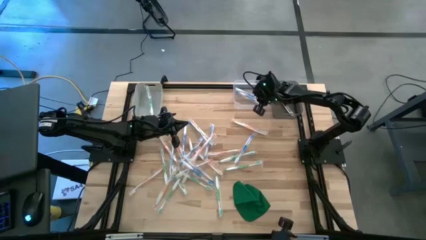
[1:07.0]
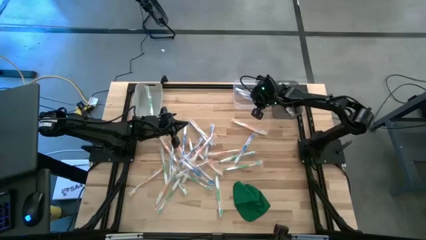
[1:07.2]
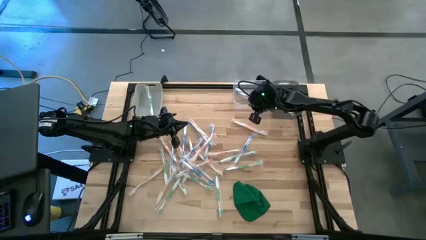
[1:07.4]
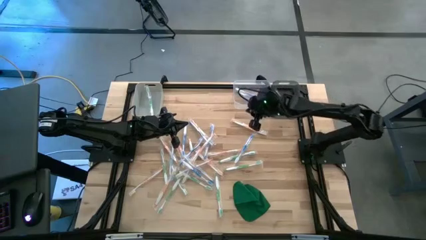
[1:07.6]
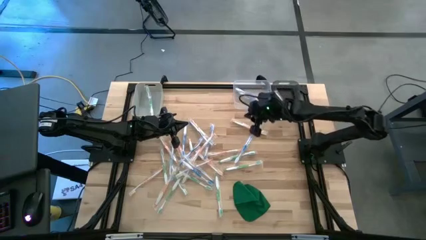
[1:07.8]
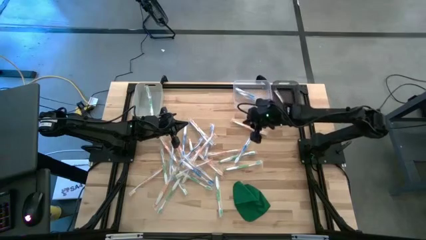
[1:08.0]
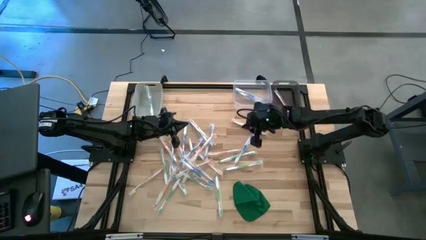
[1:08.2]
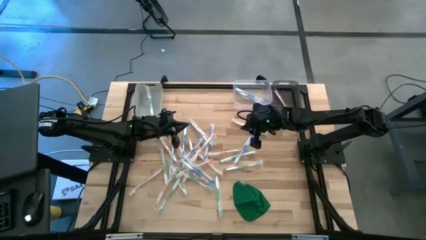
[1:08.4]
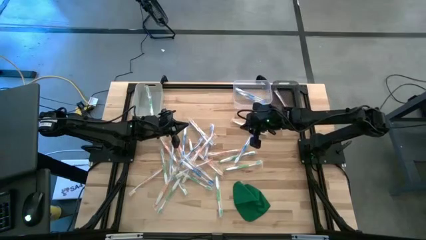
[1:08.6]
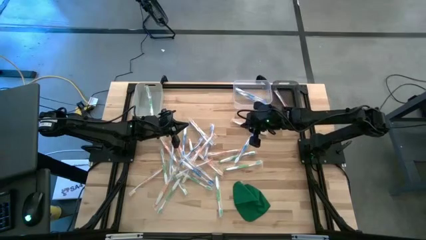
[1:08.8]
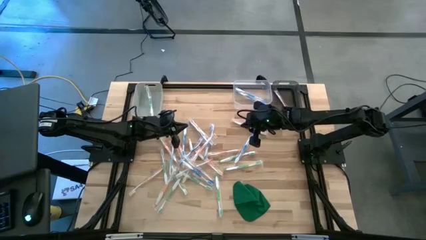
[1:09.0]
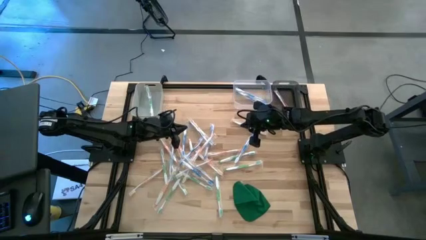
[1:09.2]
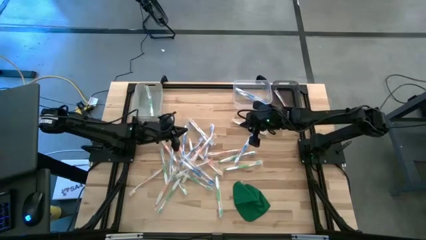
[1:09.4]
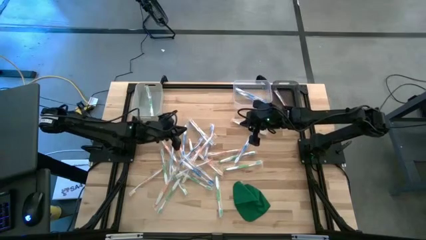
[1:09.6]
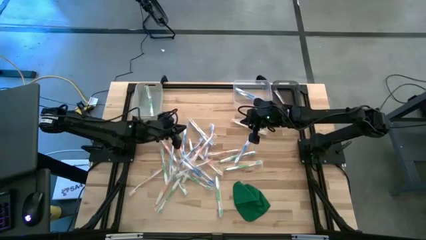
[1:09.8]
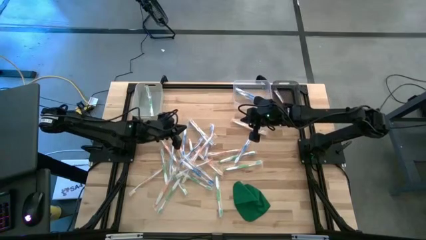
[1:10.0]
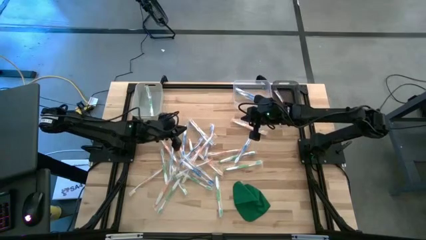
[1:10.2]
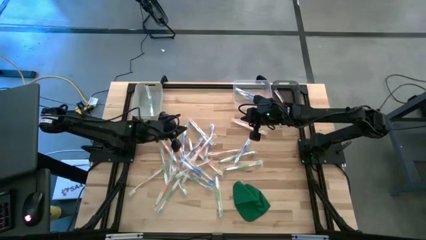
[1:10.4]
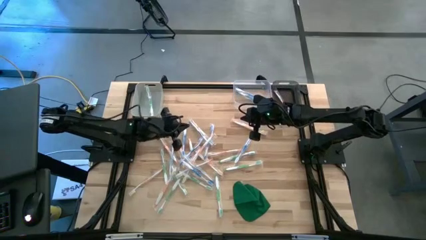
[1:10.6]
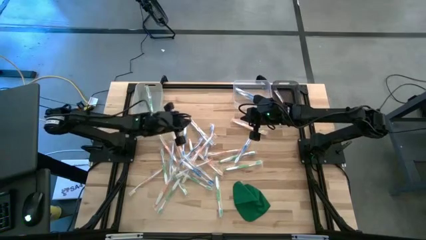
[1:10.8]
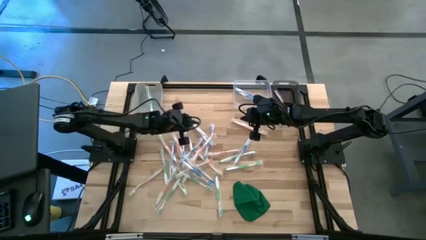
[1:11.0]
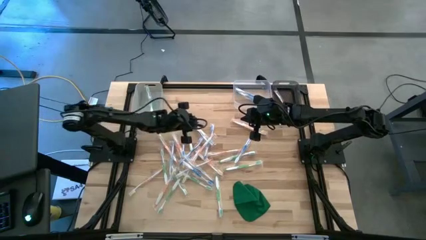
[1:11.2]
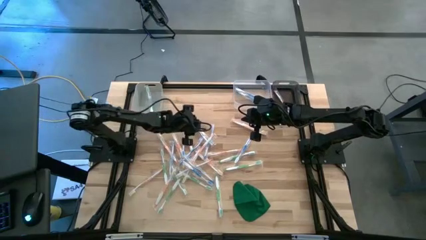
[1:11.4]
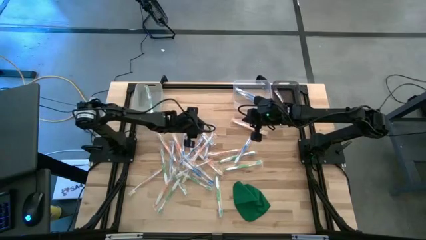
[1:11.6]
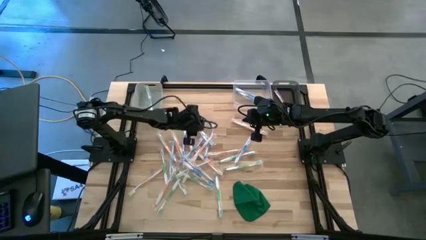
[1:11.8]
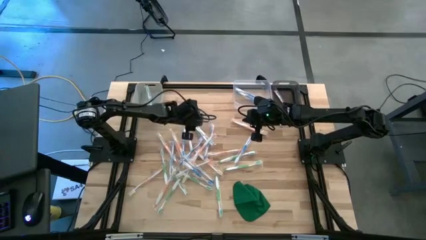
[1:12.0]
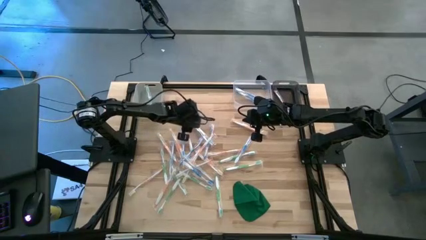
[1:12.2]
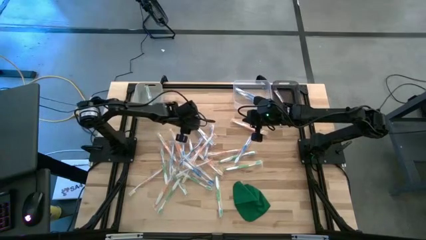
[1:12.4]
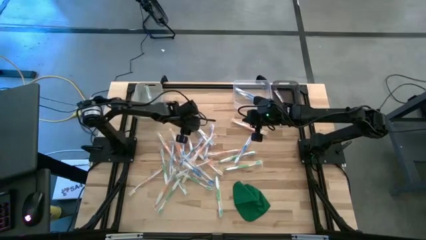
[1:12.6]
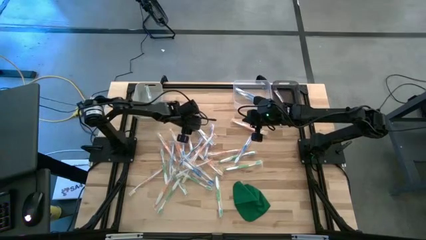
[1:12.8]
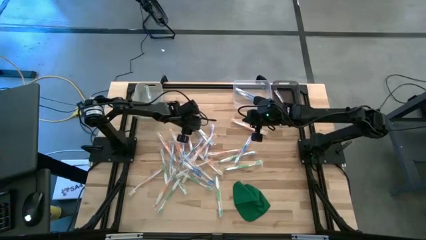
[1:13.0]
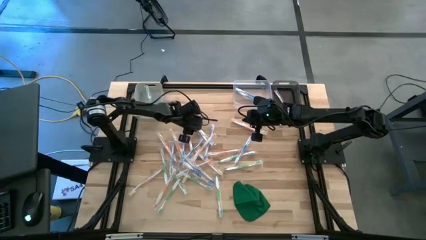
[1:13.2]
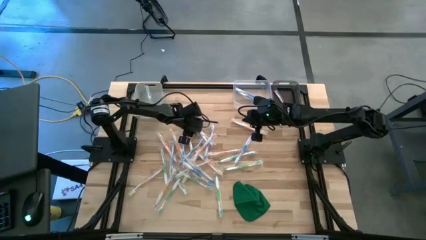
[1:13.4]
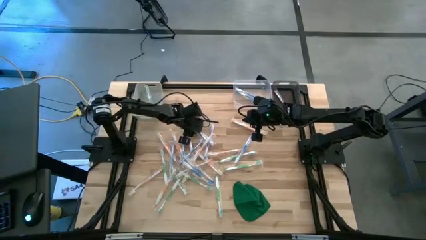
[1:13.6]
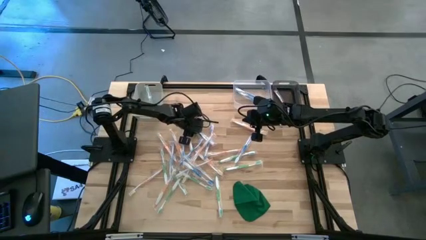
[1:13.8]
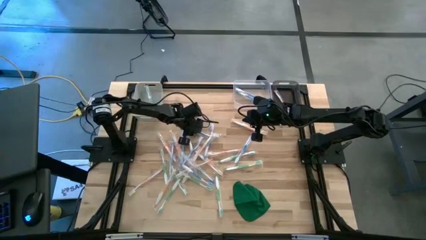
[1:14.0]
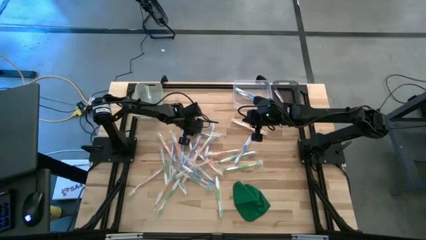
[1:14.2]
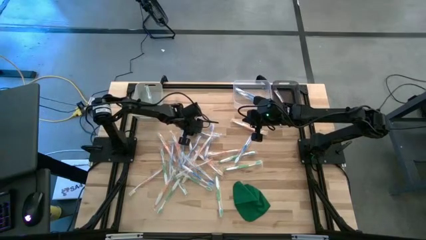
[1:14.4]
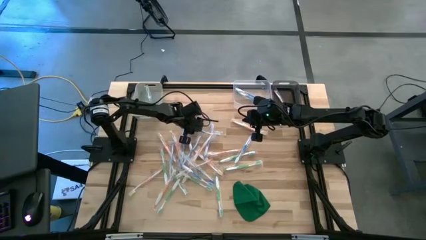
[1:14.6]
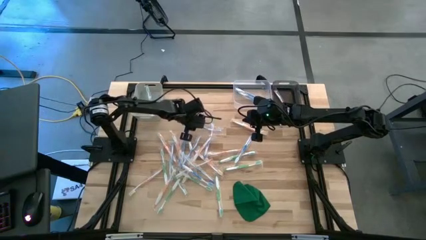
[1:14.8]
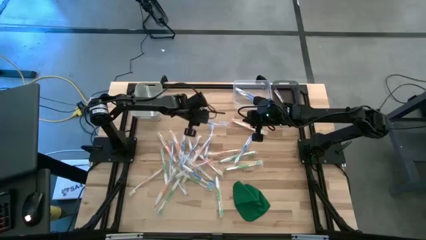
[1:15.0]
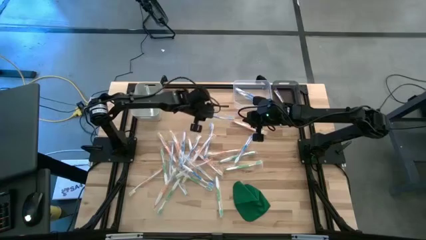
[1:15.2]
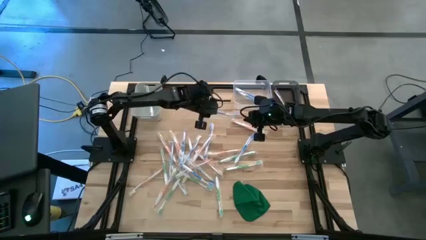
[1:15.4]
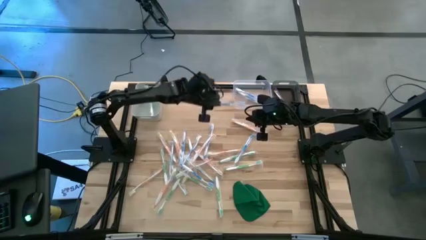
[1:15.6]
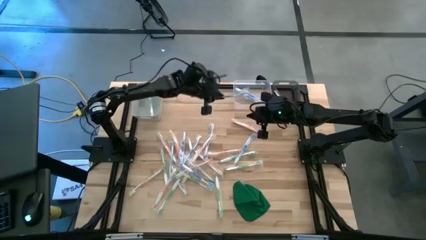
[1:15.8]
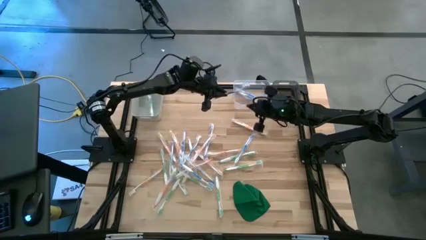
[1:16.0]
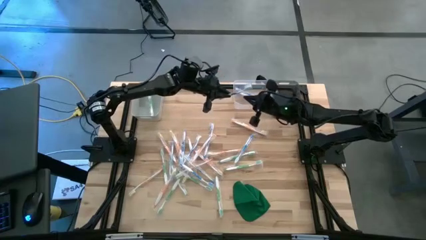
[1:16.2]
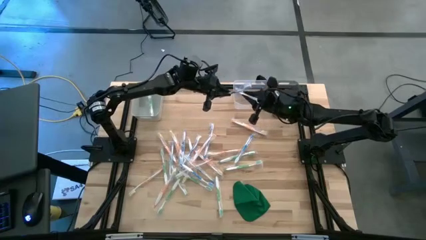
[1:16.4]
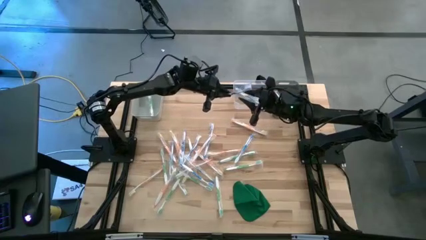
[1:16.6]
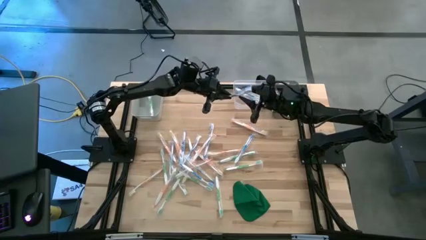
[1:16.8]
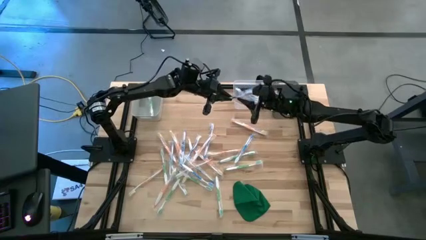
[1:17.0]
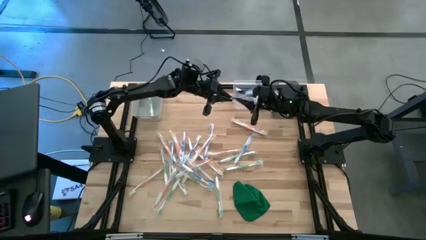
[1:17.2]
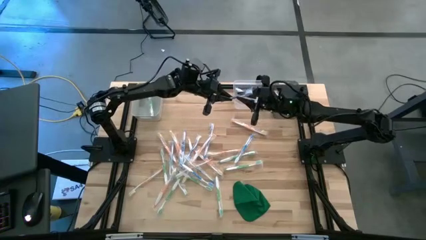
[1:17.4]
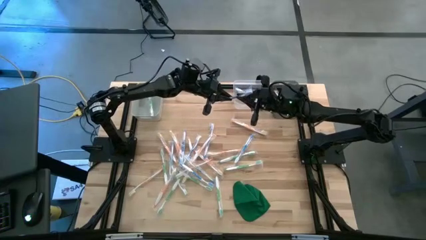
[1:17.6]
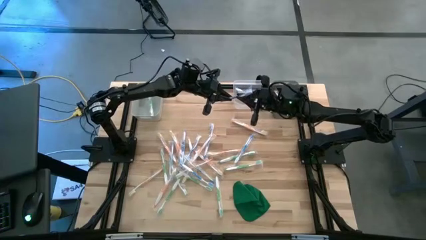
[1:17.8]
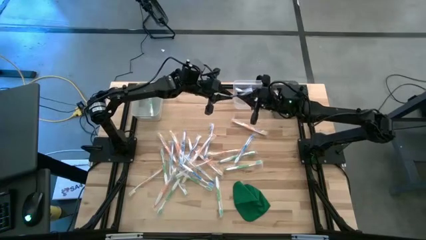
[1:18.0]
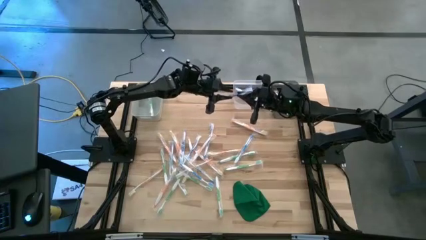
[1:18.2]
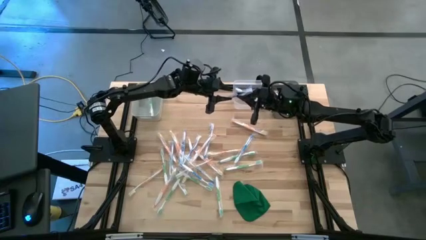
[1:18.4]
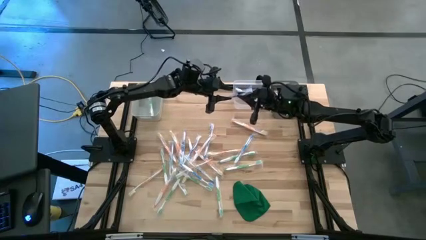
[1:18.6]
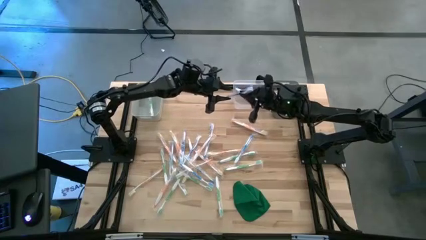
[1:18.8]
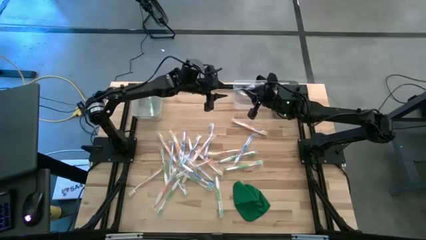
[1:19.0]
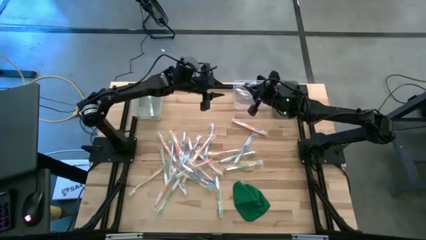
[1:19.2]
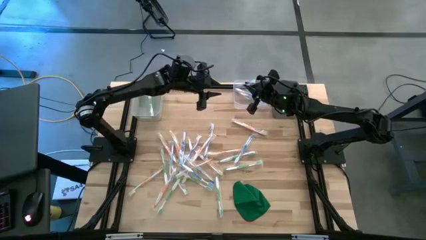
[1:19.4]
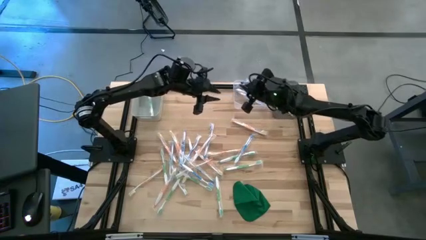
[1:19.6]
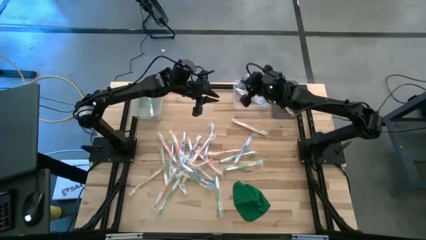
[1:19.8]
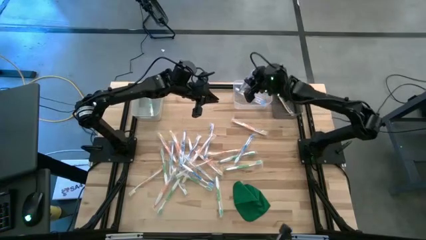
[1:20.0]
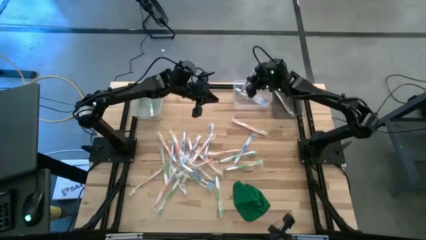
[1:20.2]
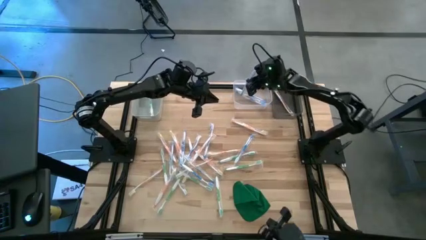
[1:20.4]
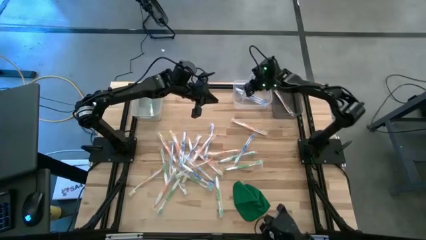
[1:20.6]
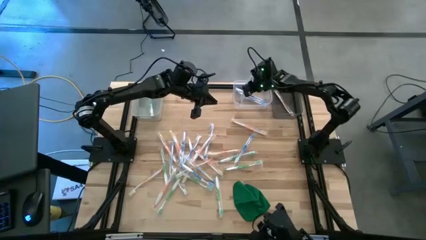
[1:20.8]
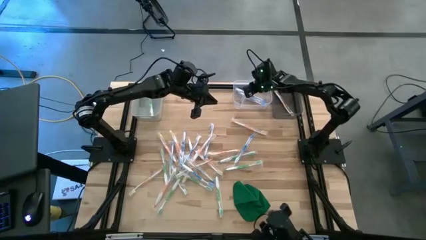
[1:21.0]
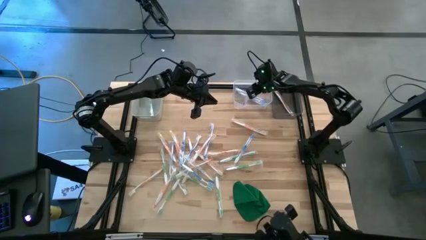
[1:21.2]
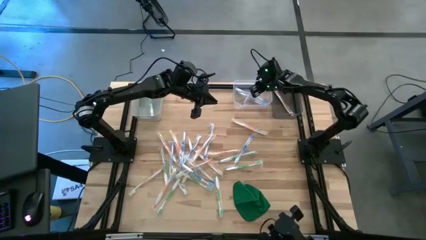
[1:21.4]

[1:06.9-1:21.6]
Task: Pick & Place Toothbrushes
Put the blue toothbrush into the transparent bin
